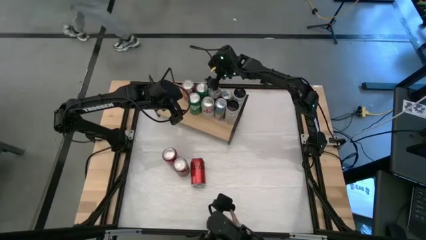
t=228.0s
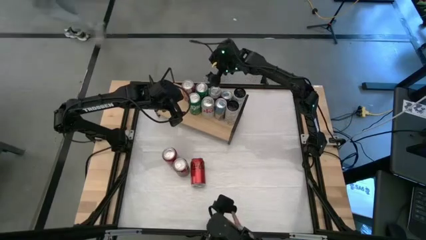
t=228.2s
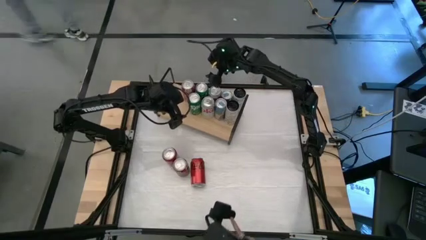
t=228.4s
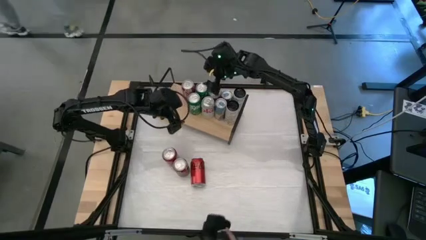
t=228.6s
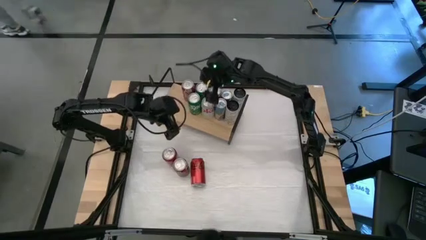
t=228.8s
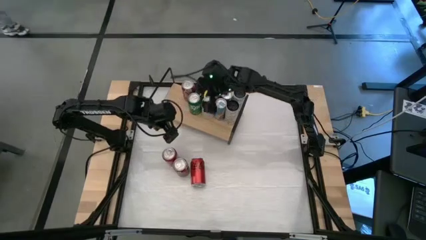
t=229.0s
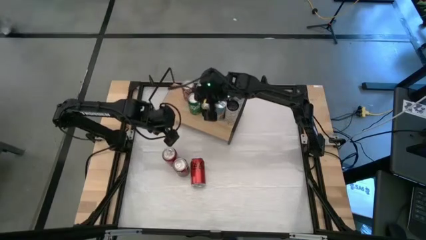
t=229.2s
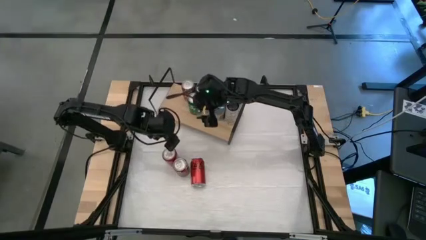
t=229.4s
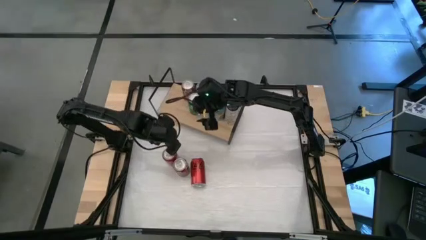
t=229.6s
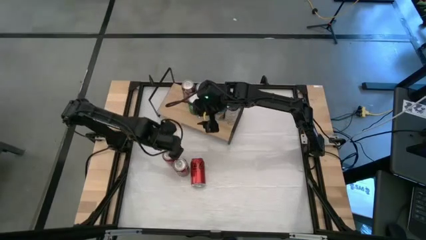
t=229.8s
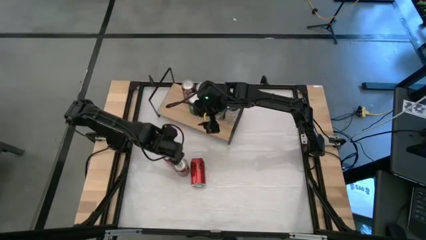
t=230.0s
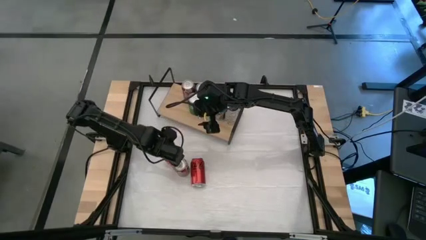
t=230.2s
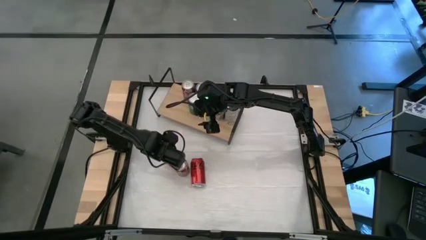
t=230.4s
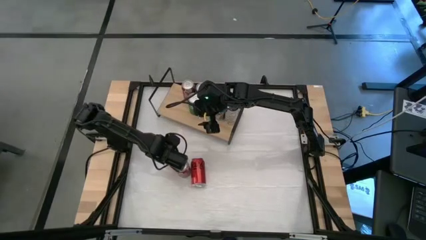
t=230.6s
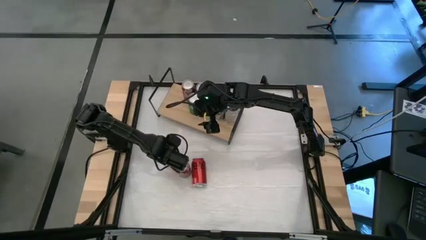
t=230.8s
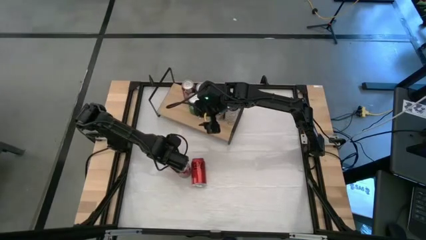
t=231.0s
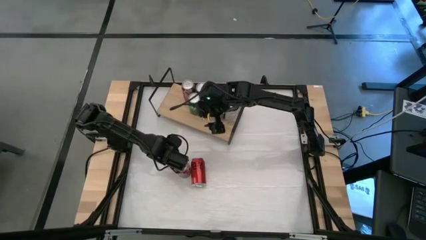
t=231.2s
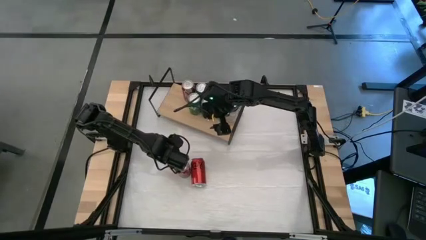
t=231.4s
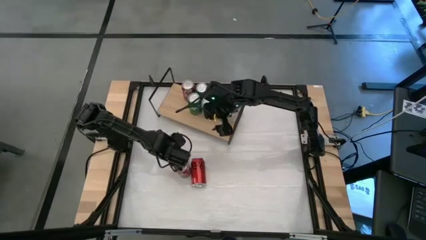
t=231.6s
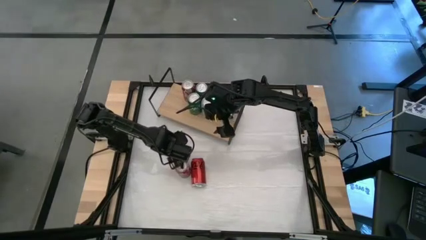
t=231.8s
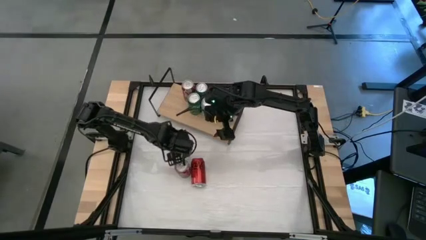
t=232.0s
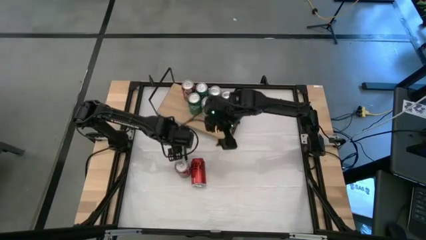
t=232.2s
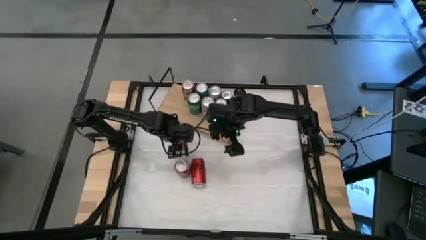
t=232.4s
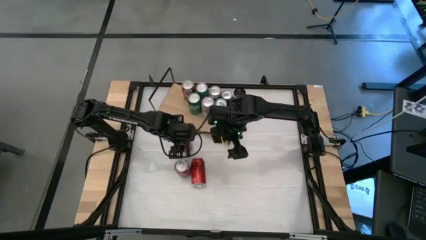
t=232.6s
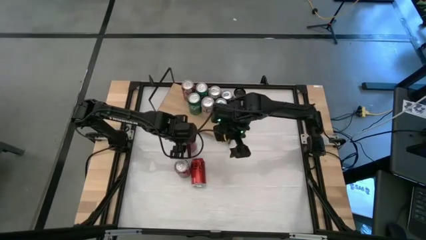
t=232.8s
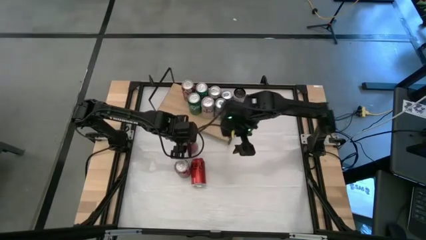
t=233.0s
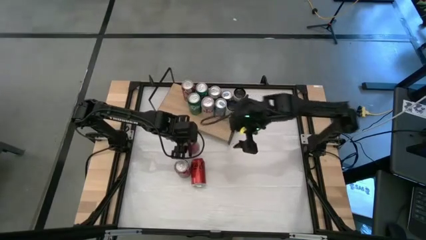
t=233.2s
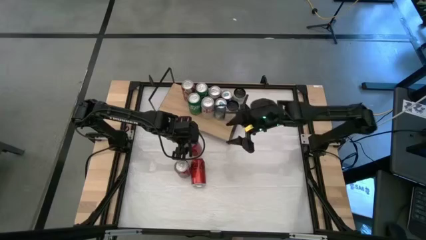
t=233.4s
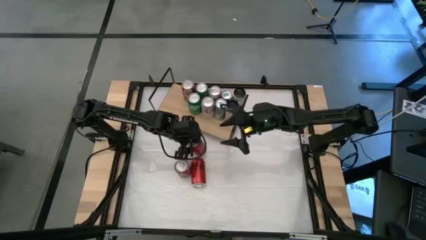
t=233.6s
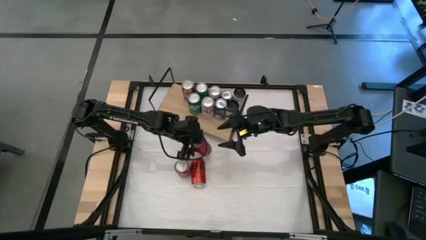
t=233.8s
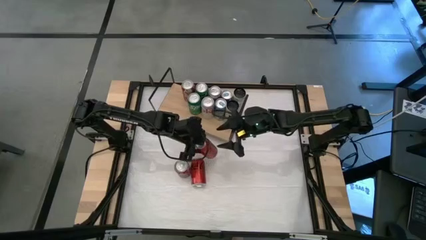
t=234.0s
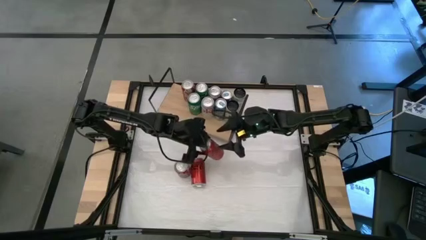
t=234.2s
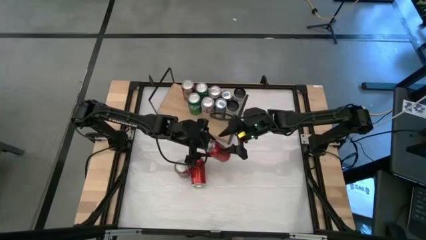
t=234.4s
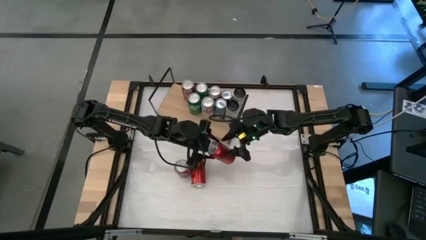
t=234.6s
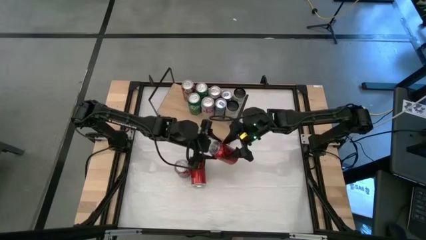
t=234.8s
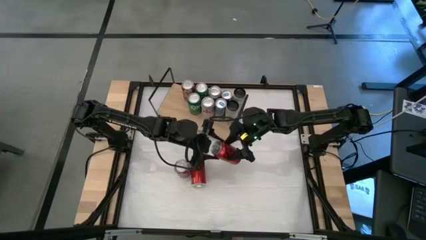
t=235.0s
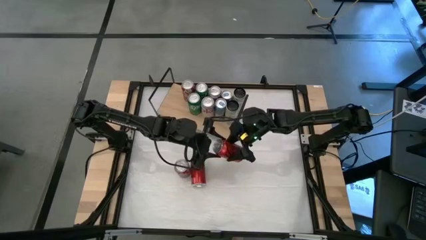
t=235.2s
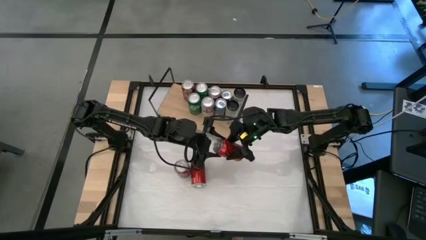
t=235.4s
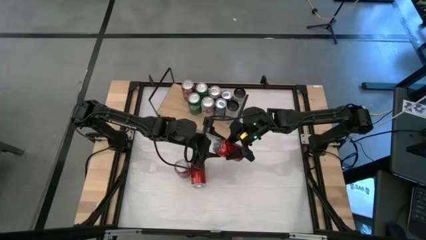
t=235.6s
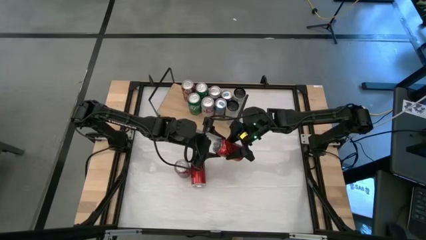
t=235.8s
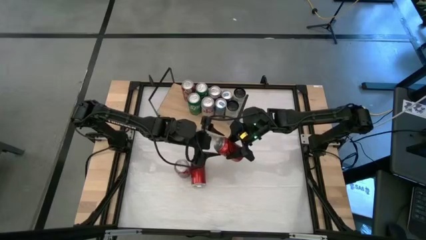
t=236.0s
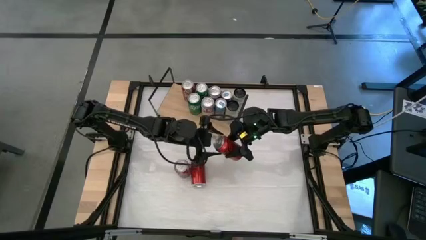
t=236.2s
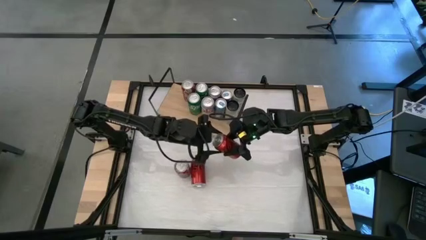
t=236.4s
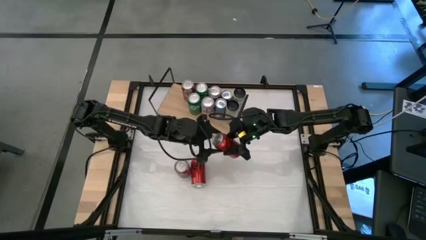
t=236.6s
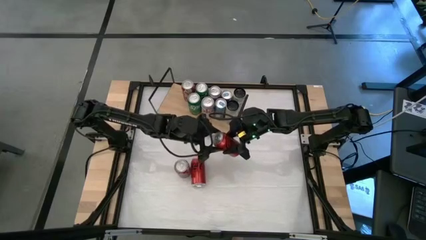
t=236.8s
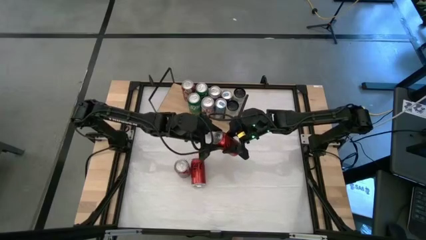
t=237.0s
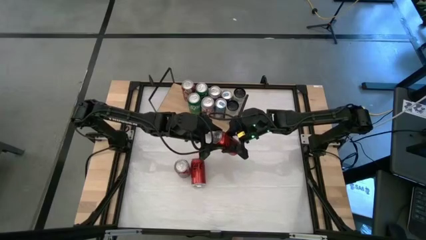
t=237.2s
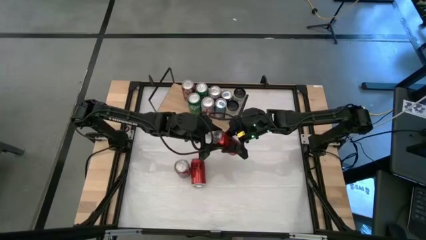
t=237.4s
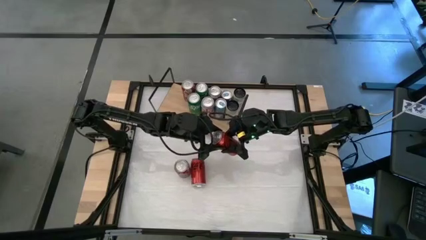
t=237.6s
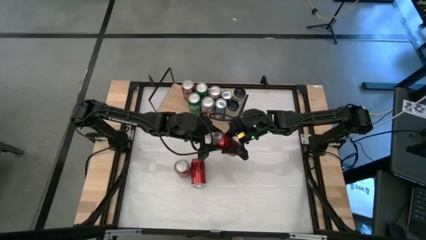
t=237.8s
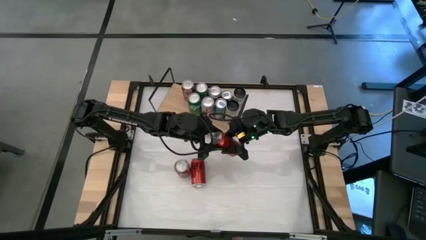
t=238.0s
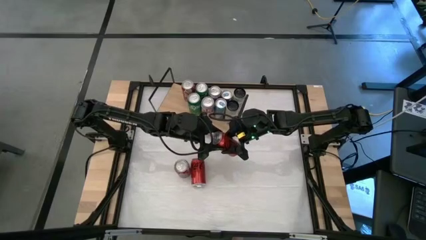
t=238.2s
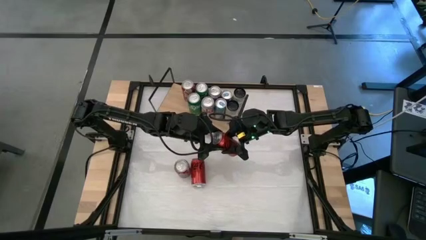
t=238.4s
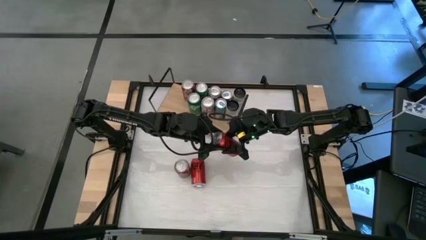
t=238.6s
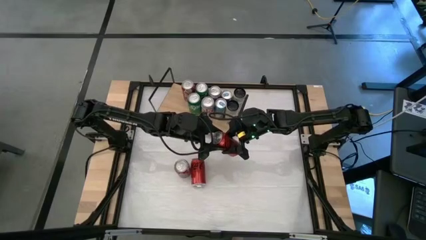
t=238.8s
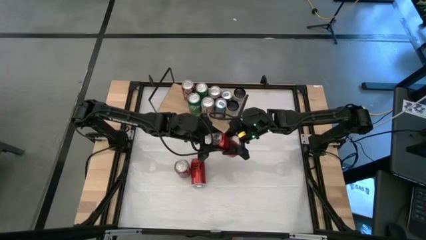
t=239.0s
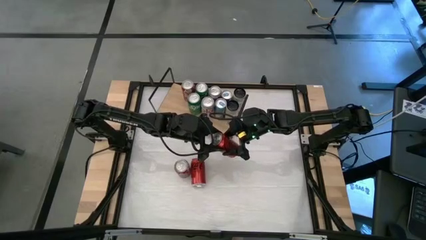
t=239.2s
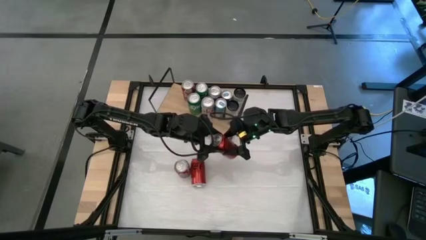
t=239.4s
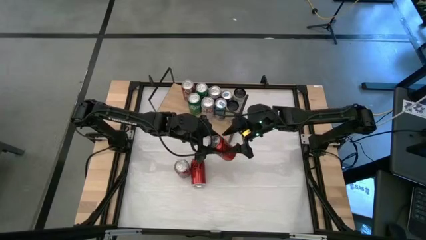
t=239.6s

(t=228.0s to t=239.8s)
Task: Place canned beverage on shelf
Put the left red black soda can on the shelf

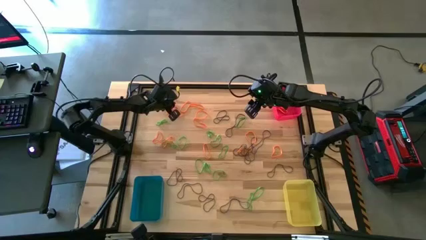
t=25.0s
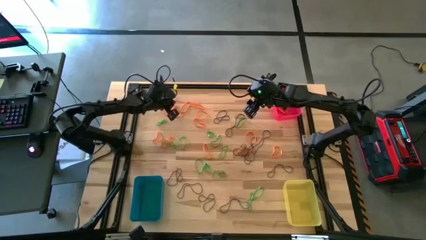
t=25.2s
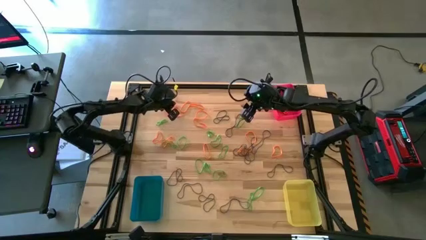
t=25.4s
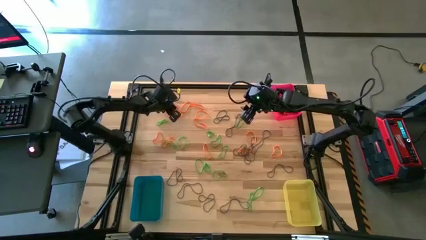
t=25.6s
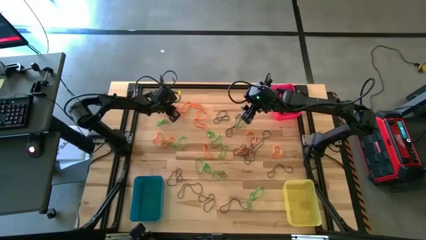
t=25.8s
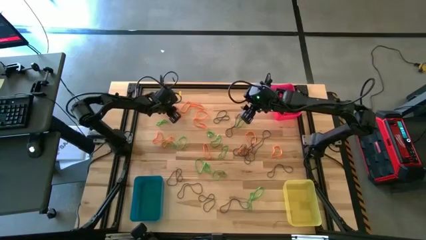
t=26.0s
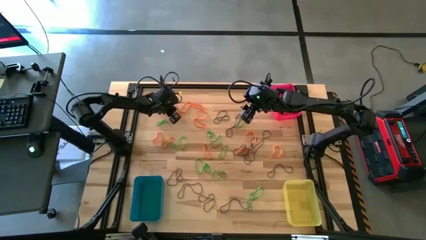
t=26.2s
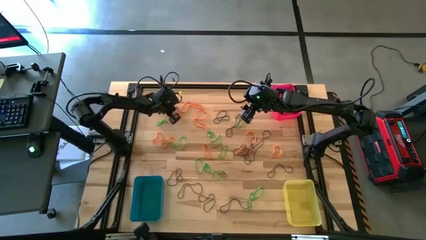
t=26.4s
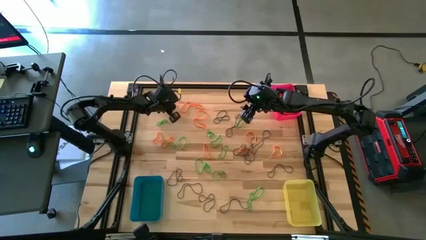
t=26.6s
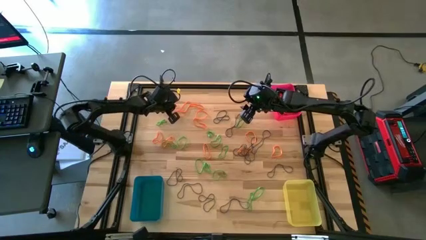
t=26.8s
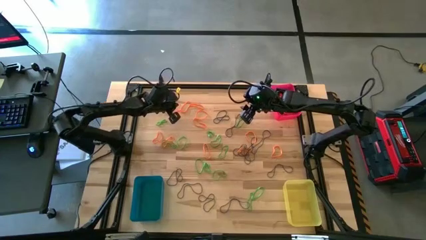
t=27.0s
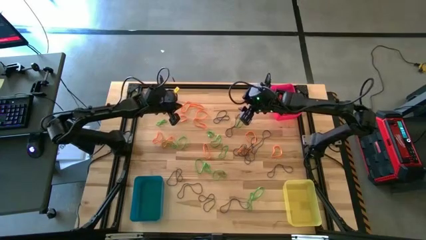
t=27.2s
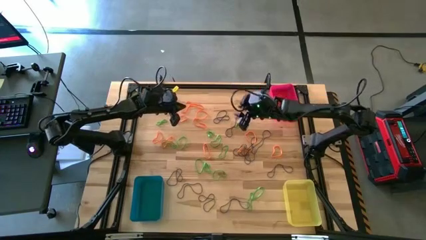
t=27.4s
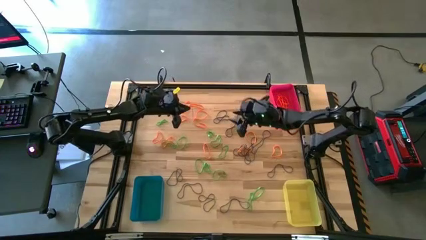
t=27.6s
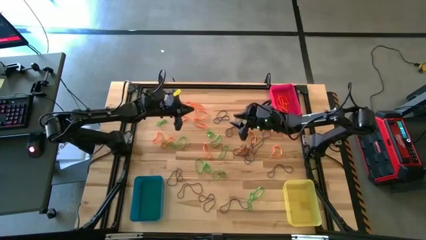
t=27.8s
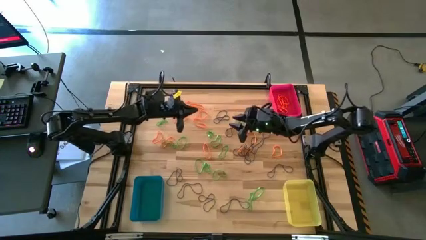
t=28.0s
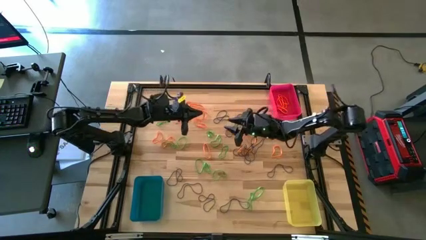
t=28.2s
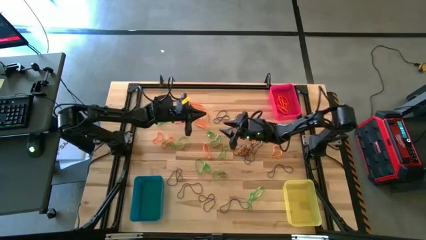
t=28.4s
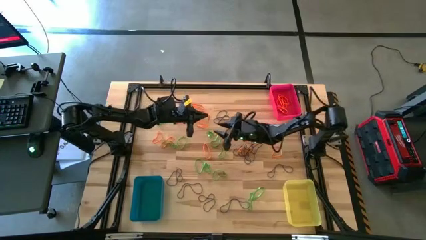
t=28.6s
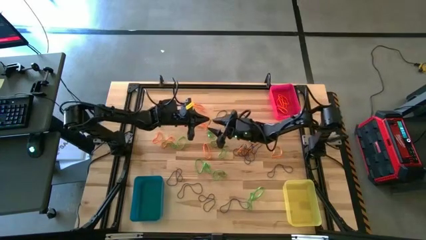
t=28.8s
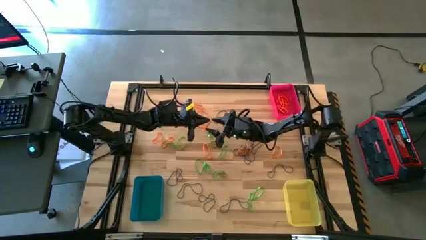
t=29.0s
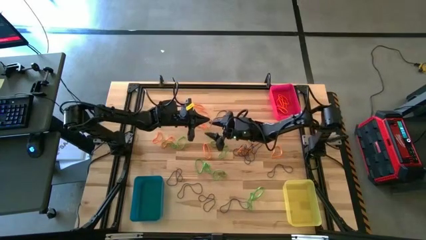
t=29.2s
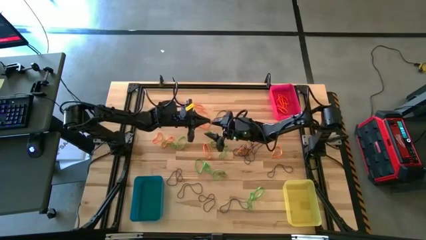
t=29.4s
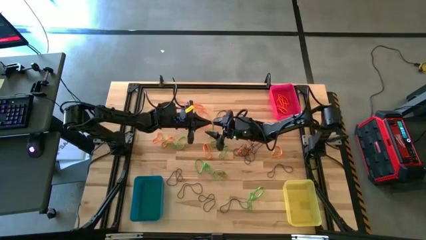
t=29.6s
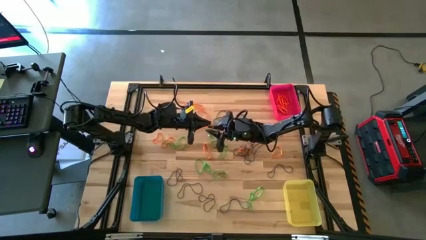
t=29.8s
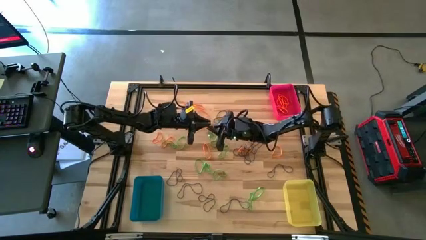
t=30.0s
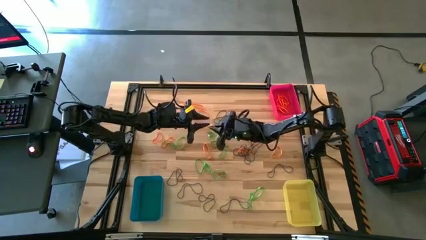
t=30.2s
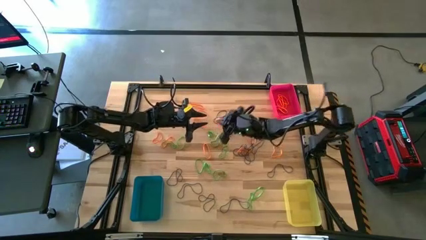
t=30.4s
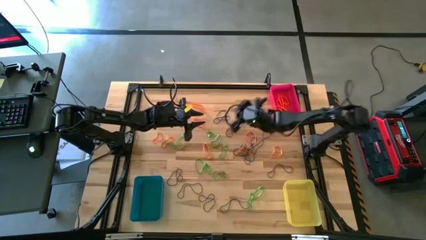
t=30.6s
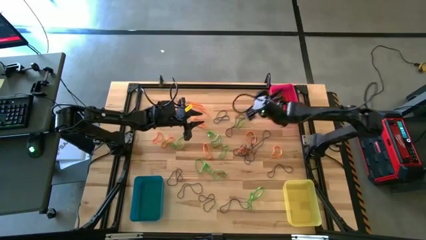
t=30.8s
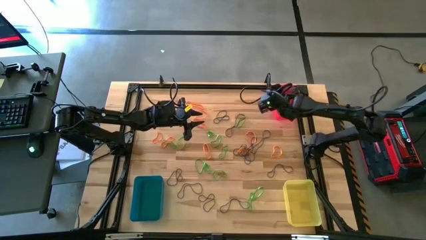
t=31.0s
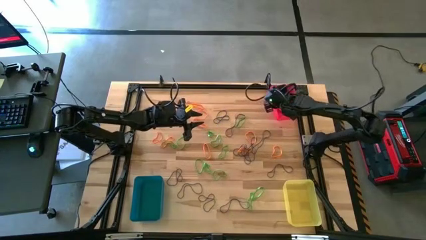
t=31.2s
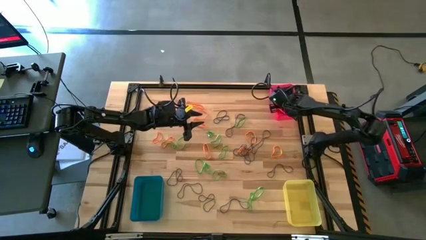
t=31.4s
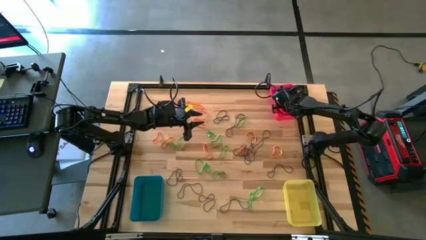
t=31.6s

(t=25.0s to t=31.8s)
Task: Sort rubber bands into baskets
Put the orange rubber band into the red bin
